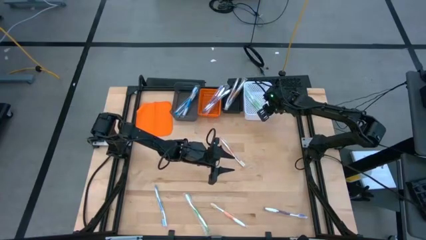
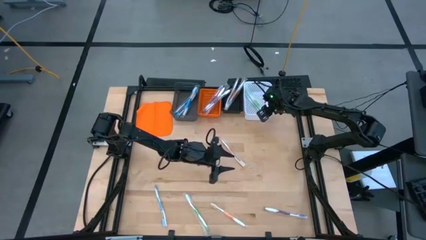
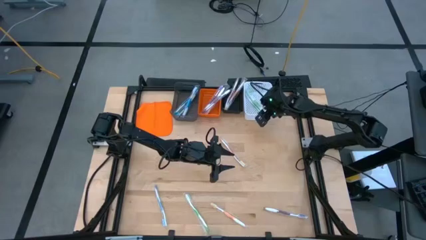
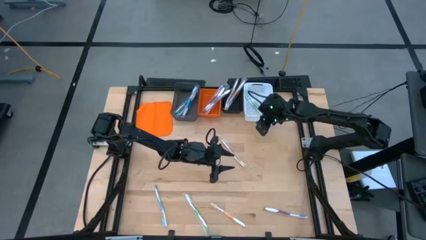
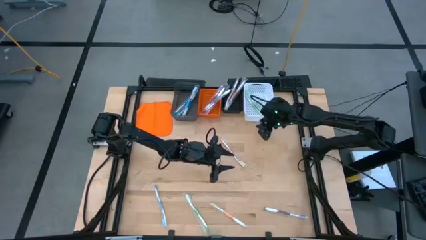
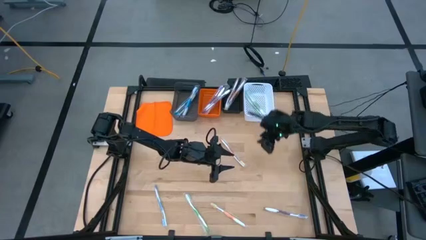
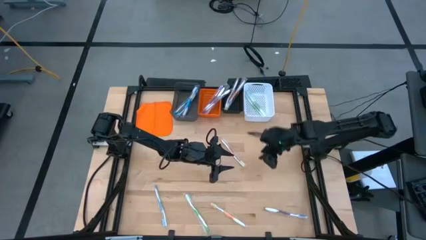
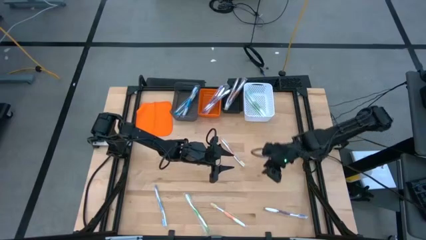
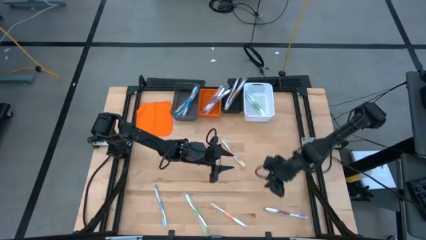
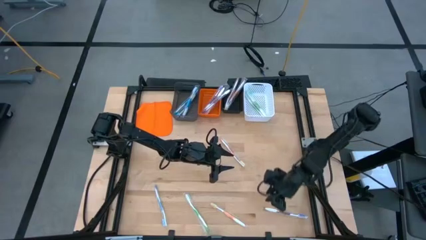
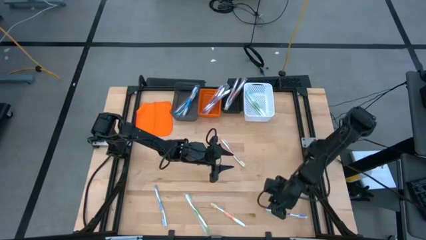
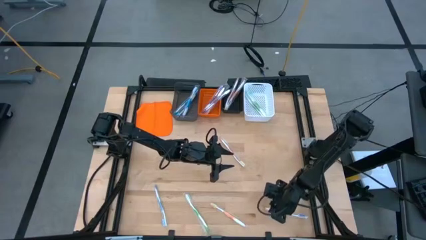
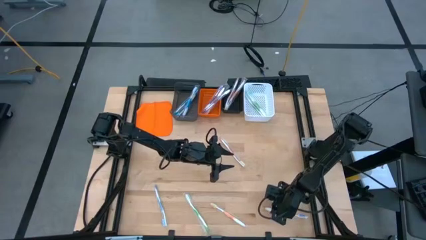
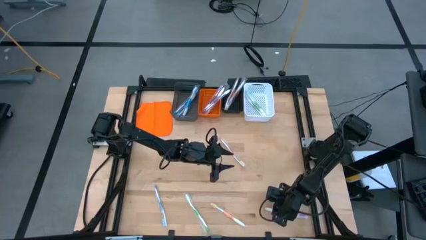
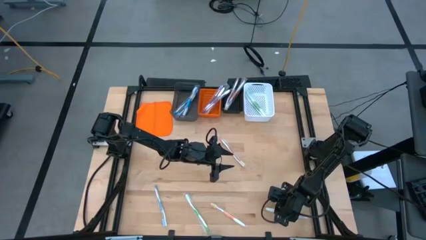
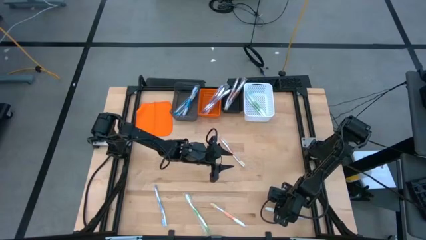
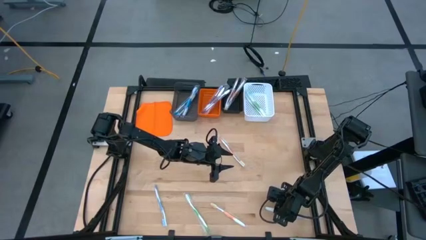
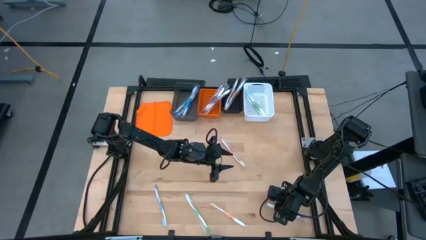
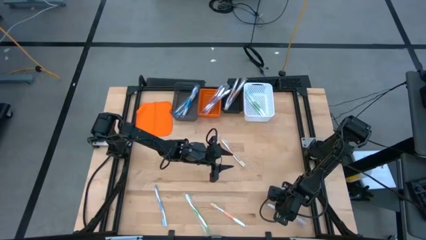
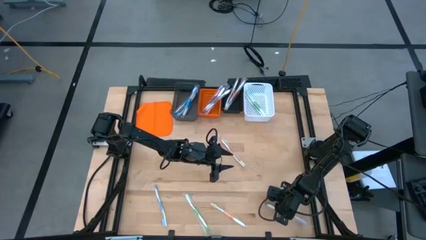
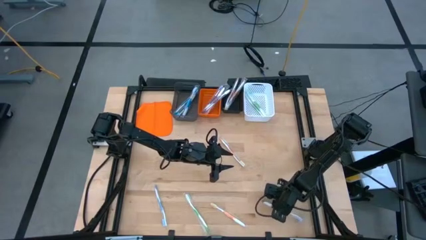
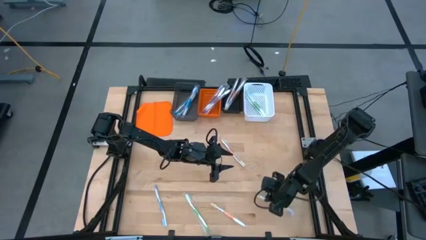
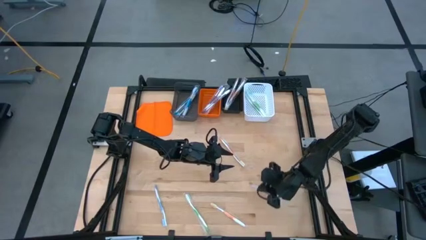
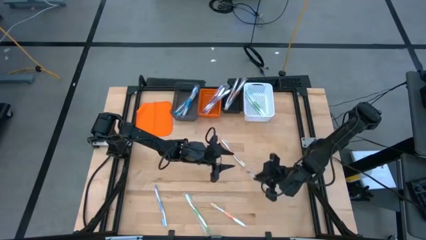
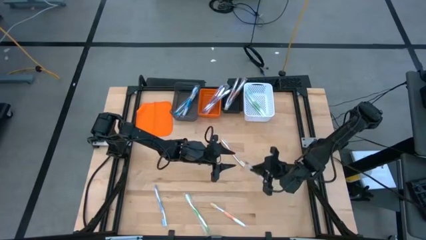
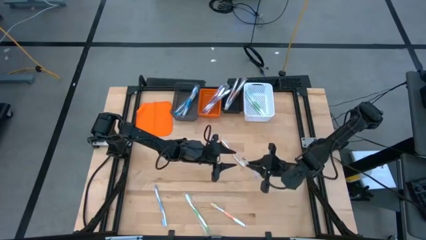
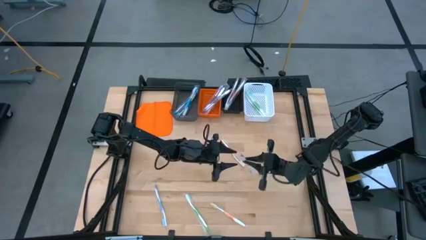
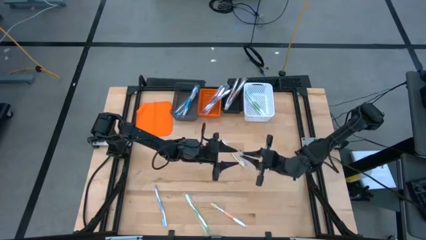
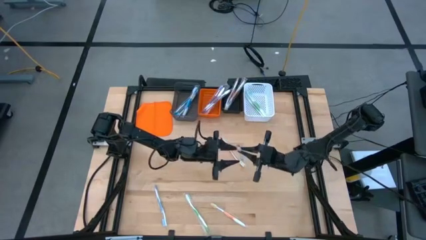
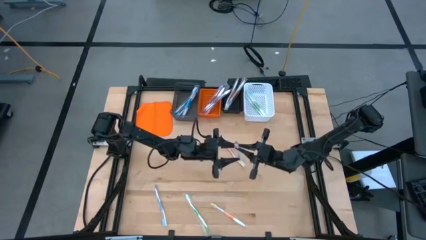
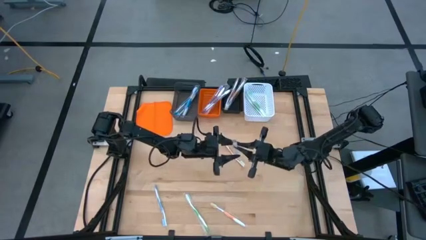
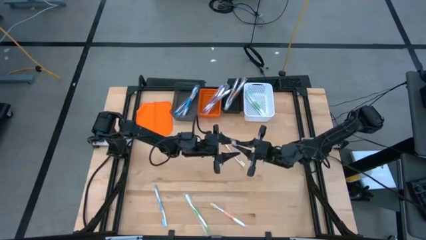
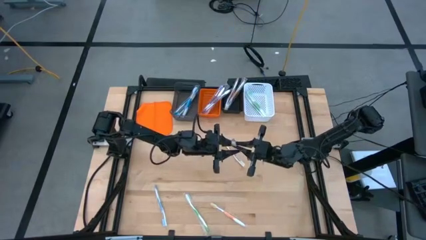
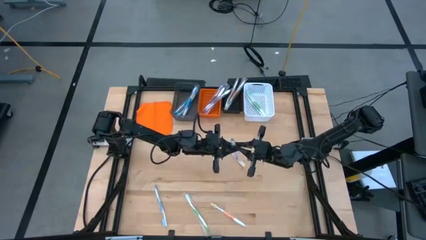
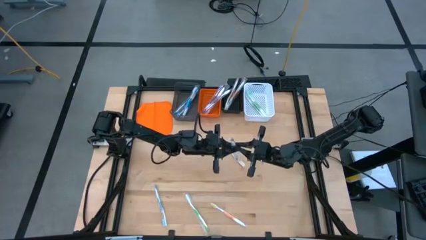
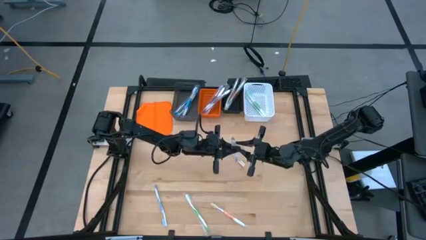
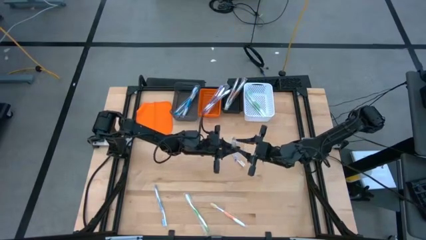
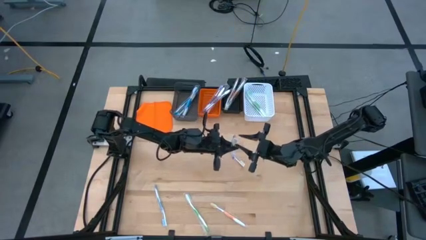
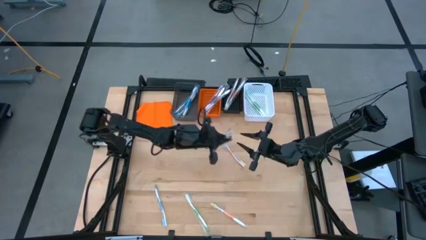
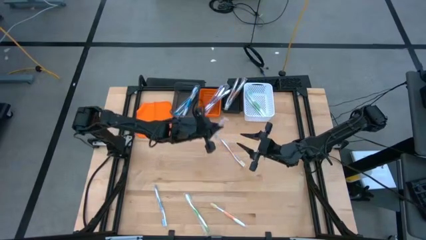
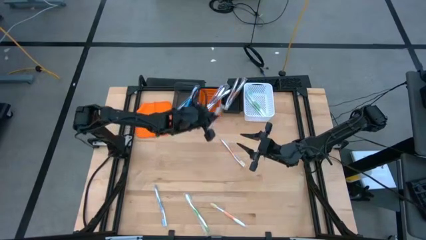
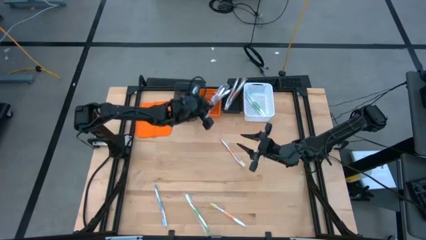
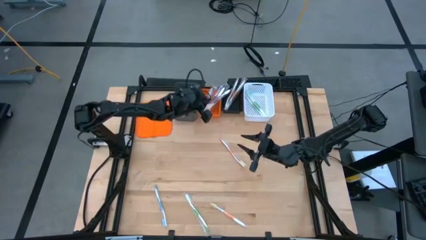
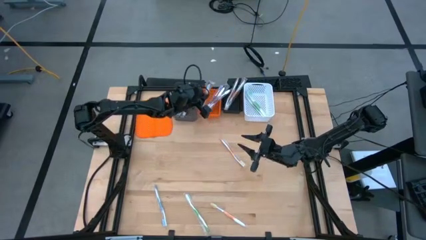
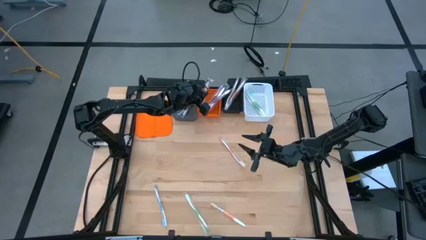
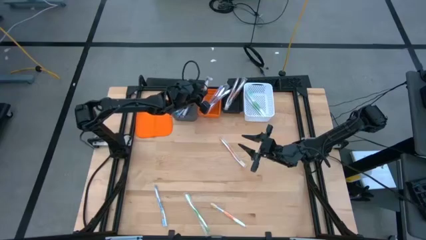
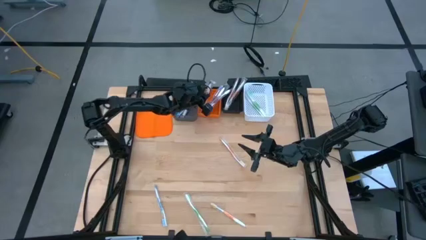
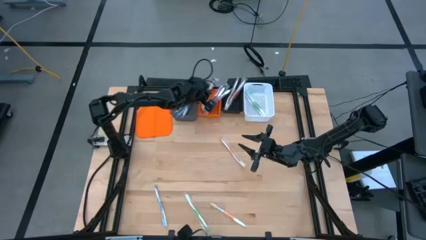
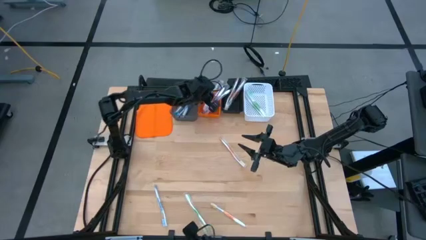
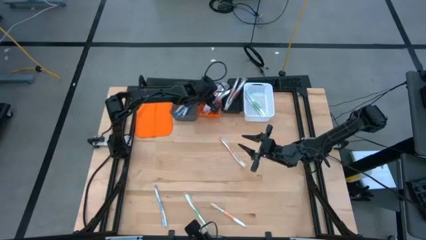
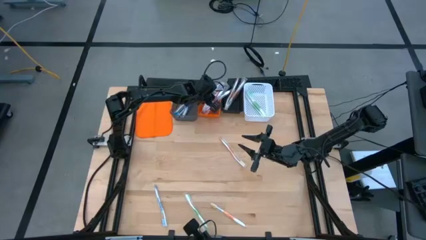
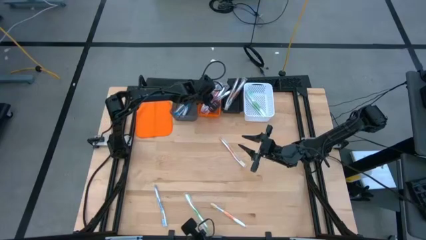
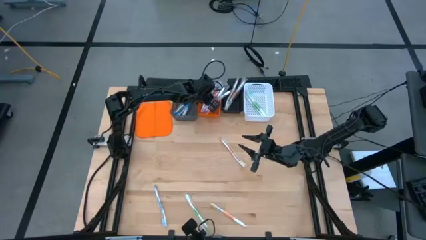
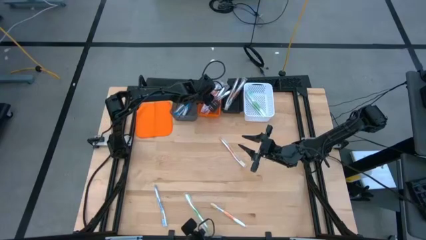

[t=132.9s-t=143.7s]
Task: Pick & Place Toothbrushes
Put the violet toothbrush into the orange bin

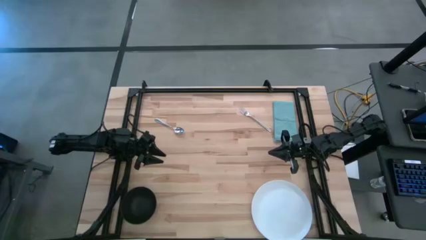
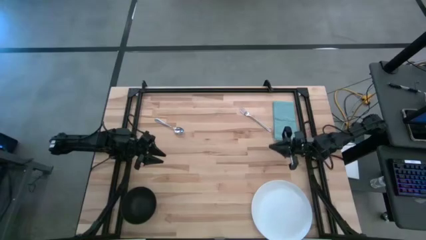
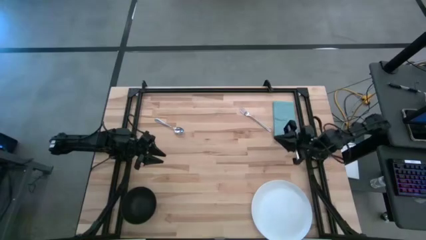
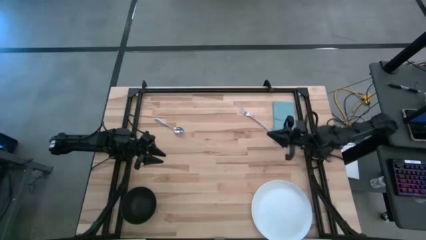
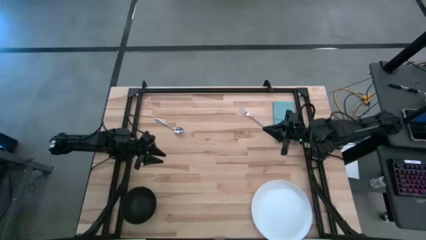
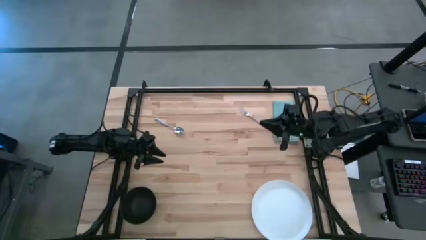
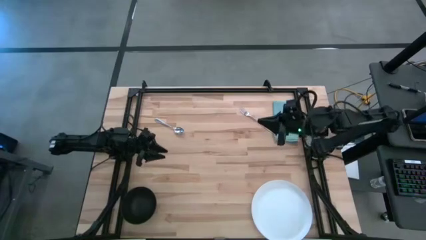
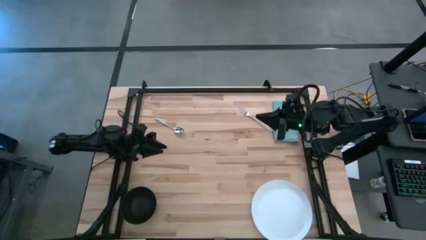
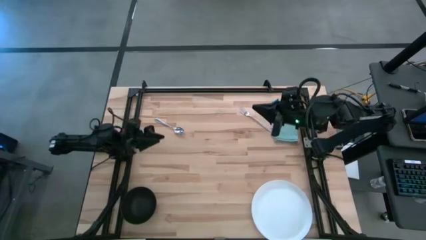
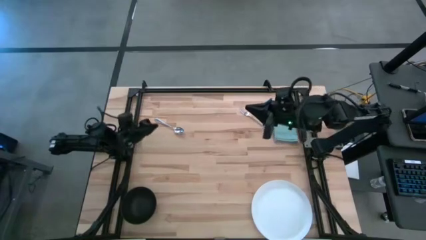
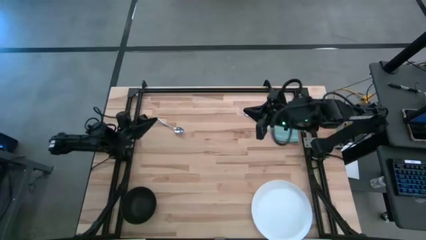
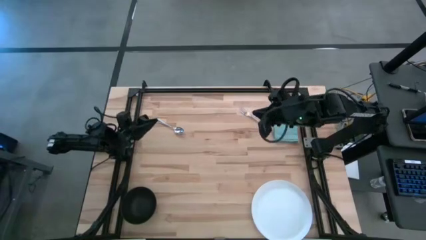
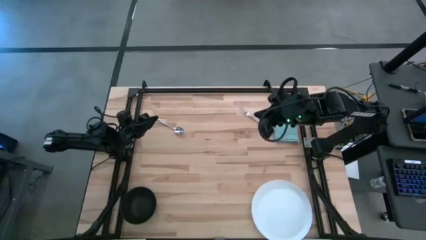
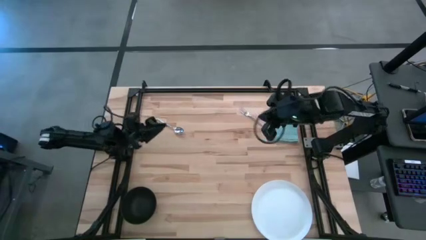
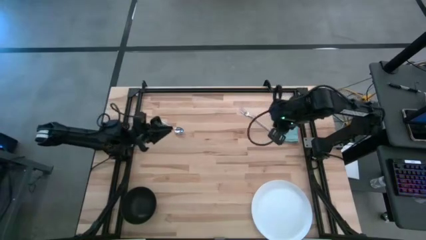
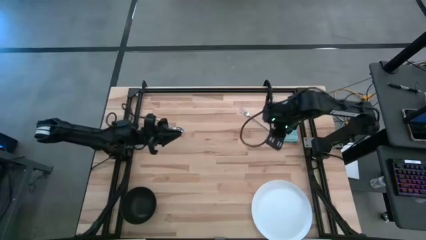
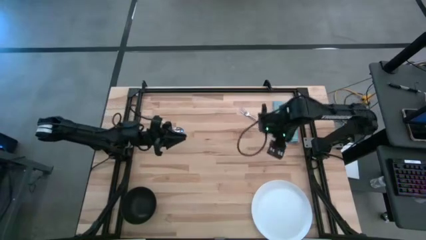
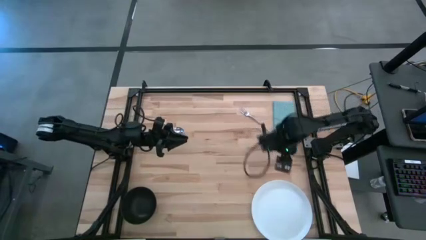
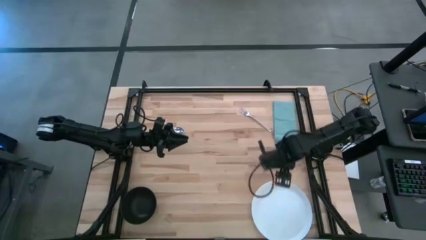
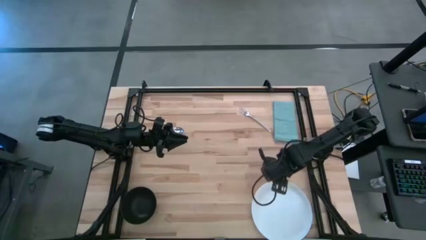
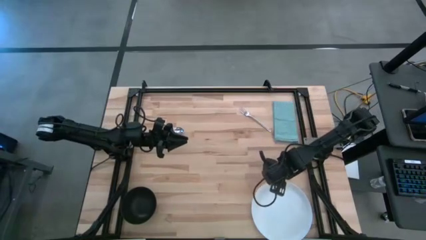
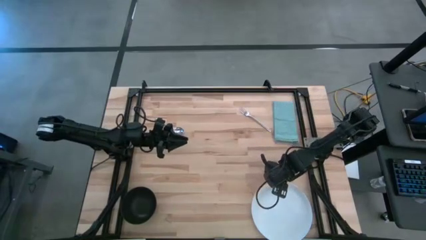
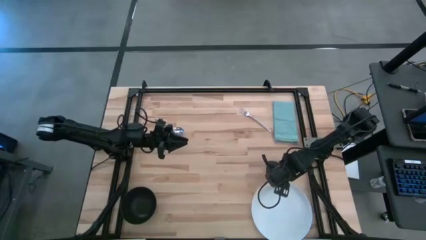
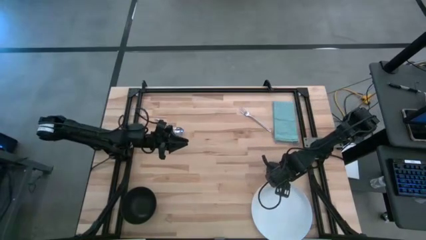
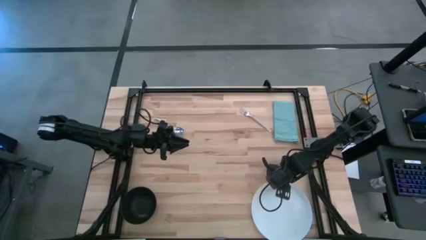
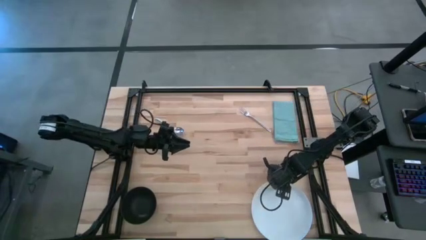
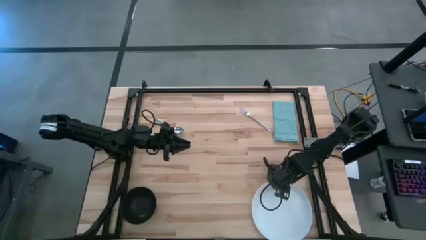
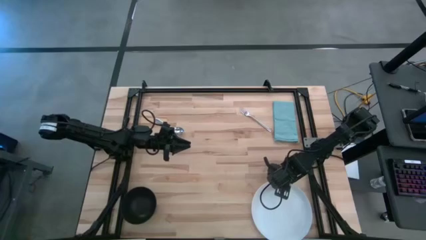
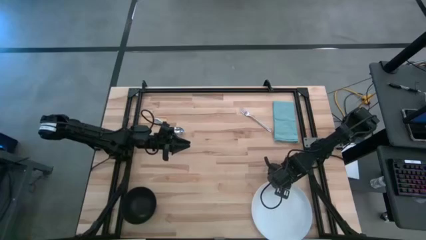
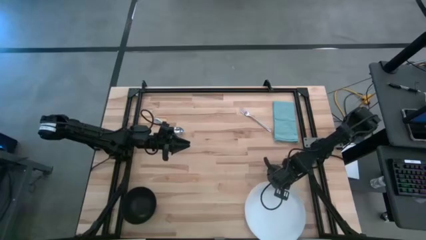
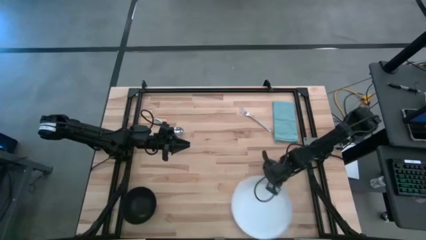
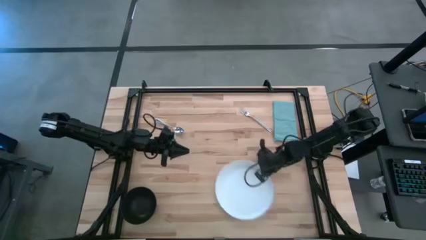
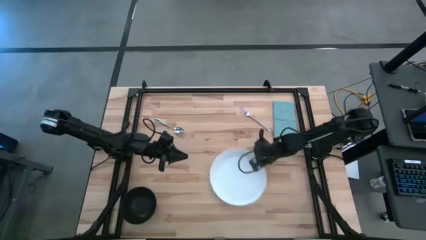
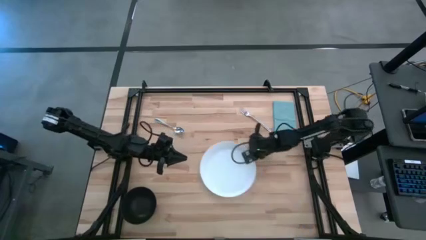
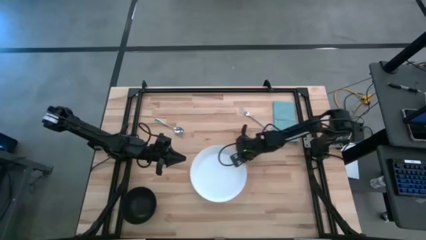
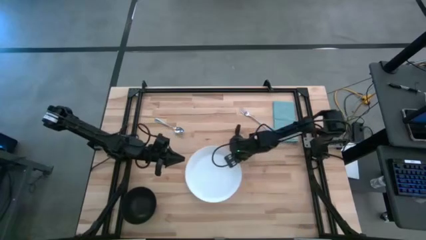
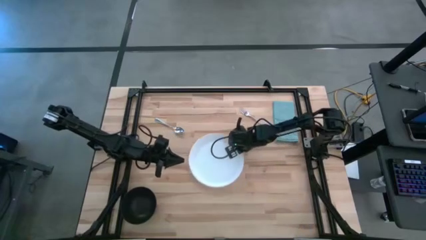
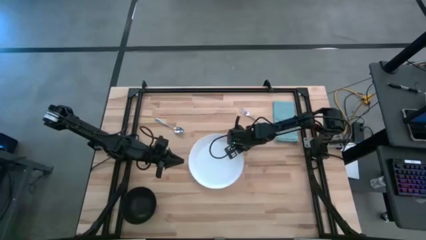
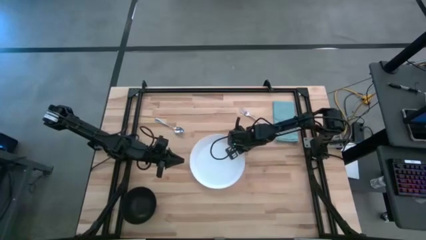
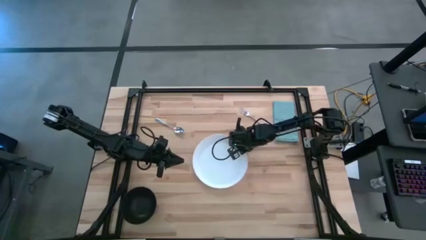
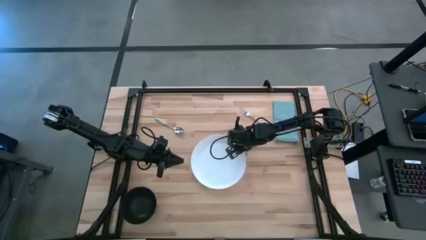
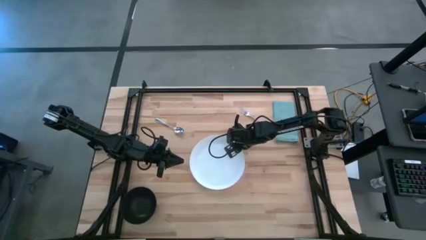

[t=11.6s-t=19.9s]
Task: Set table place
Move the white plate to the center of the table
